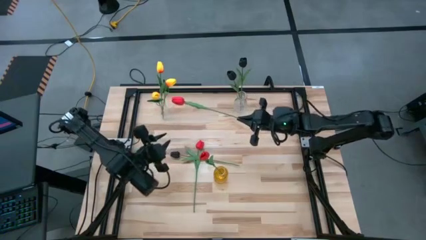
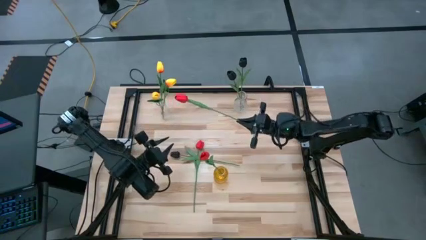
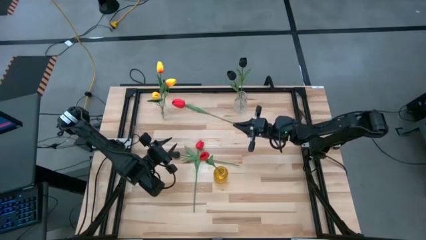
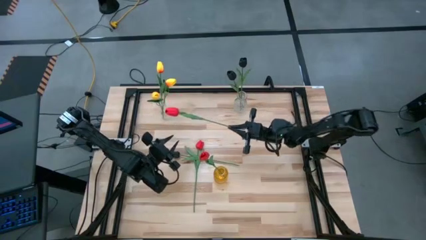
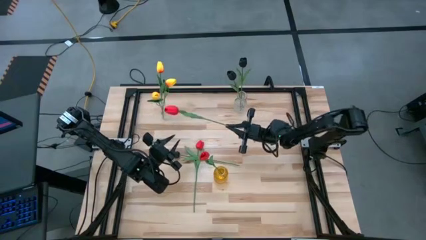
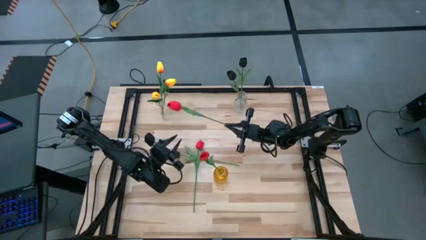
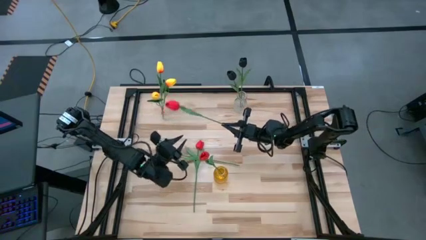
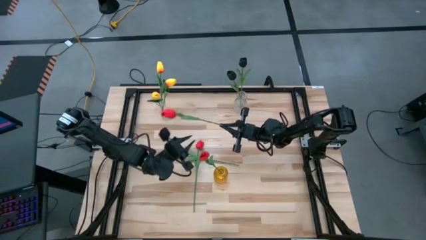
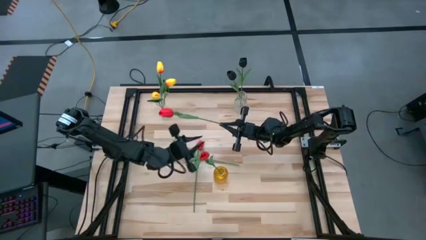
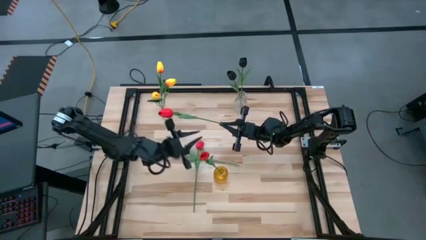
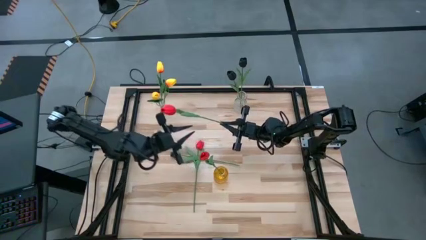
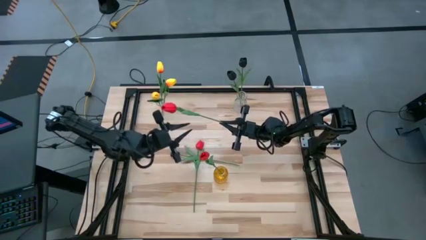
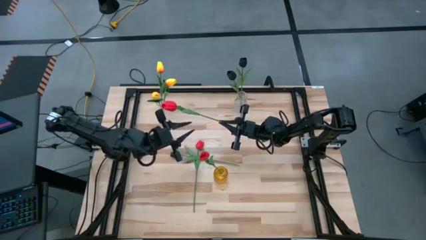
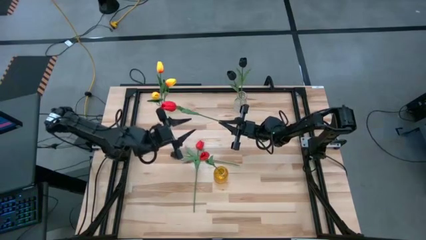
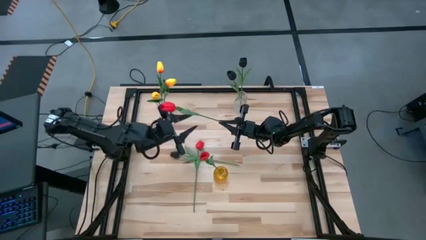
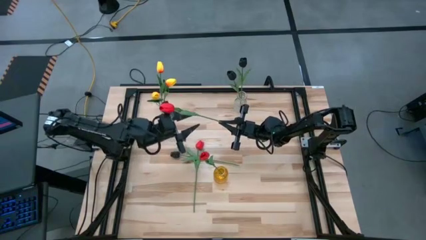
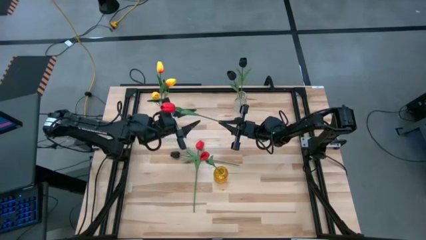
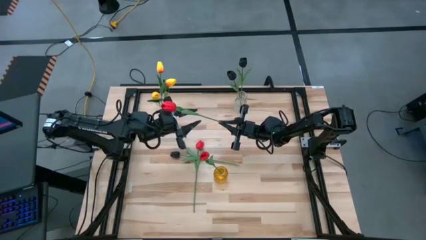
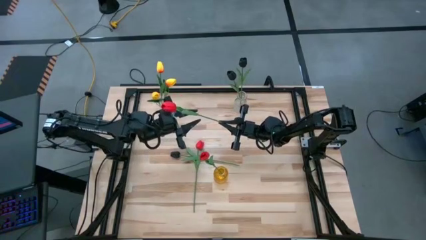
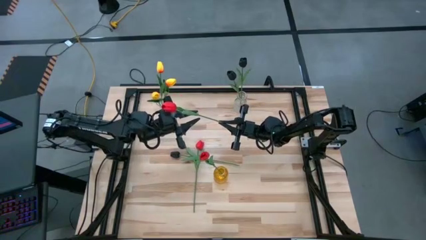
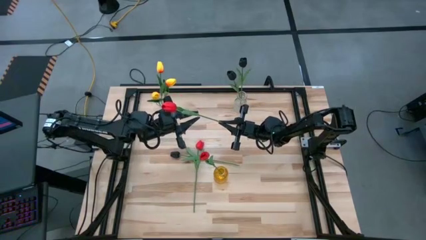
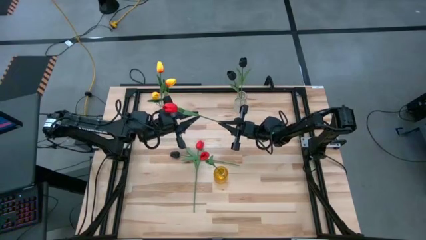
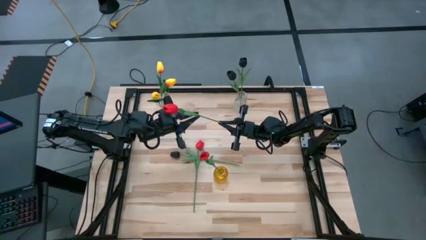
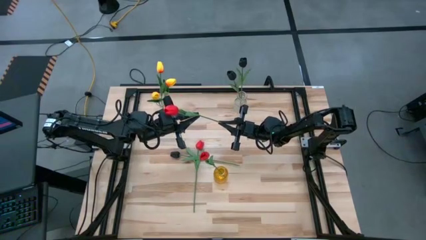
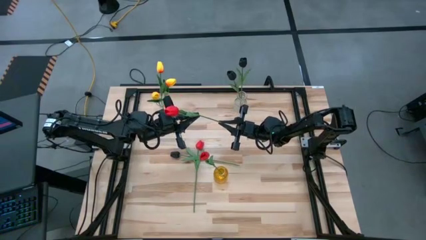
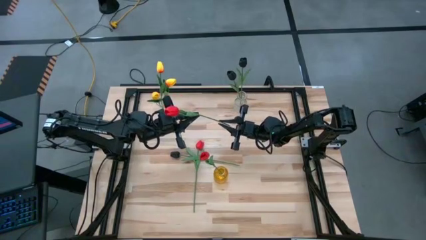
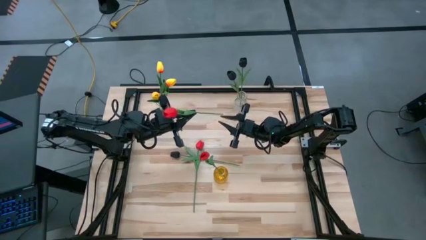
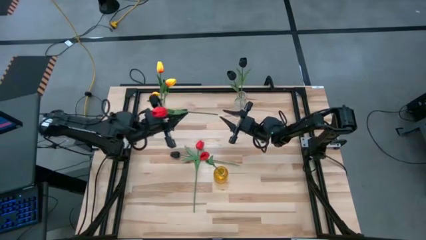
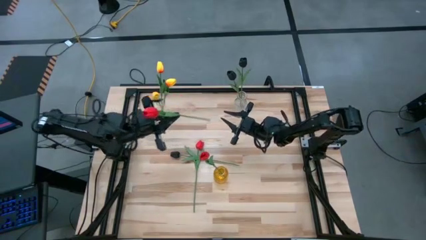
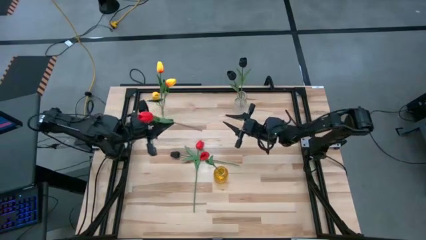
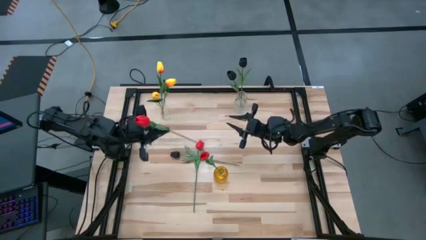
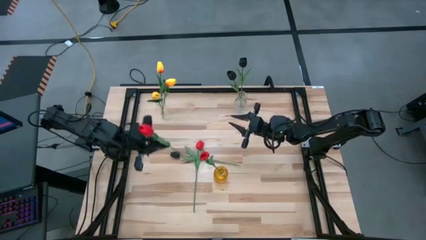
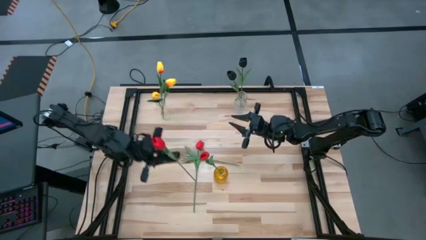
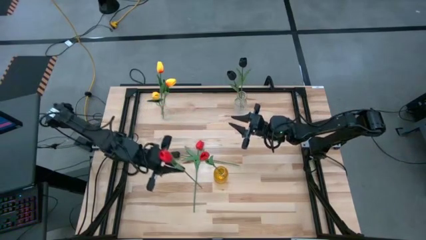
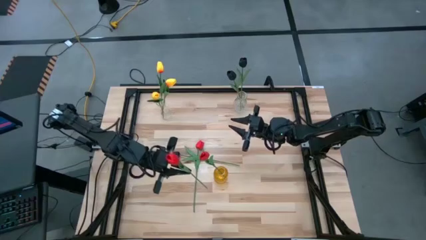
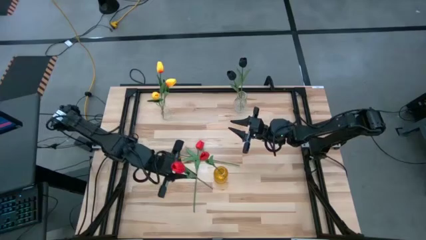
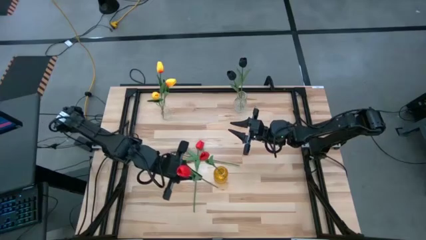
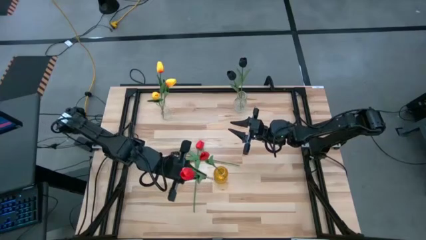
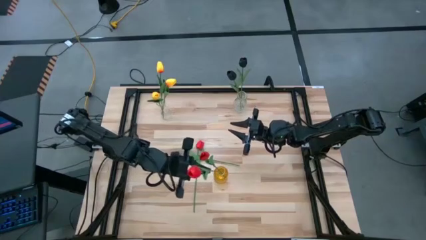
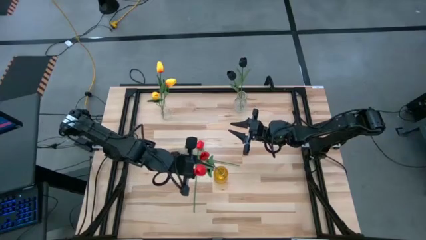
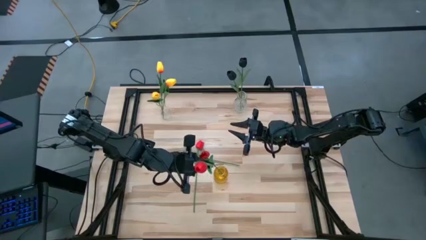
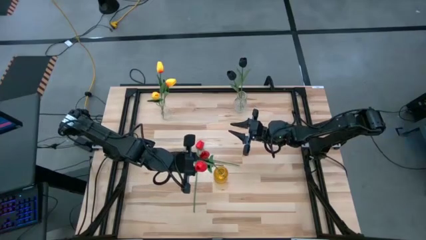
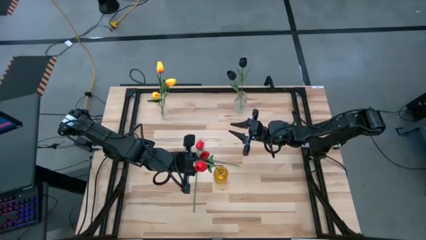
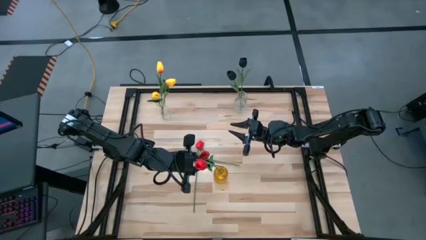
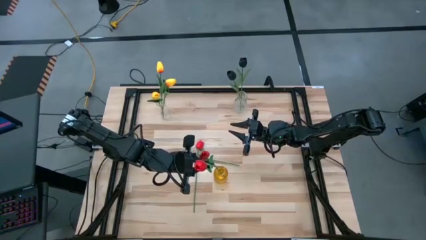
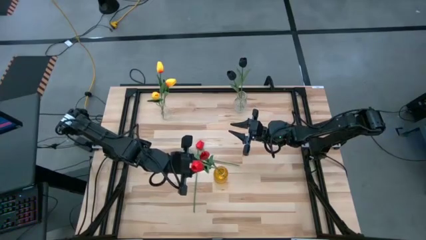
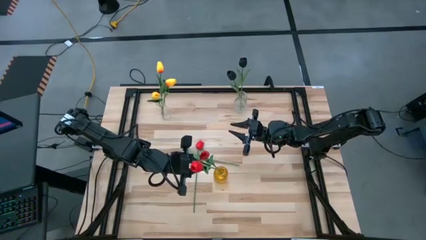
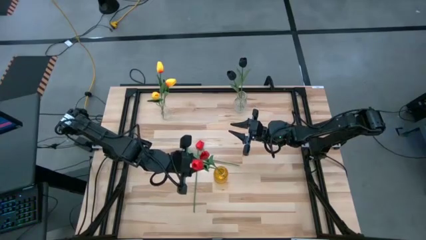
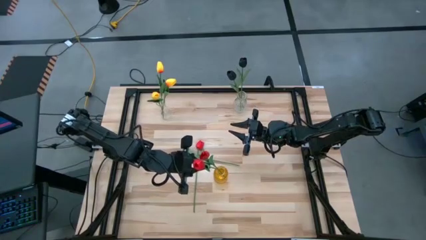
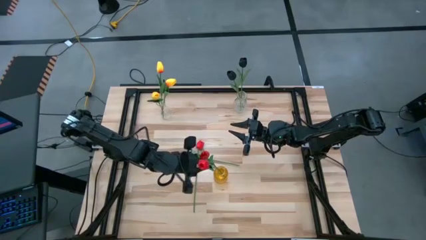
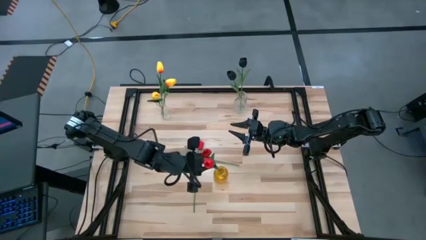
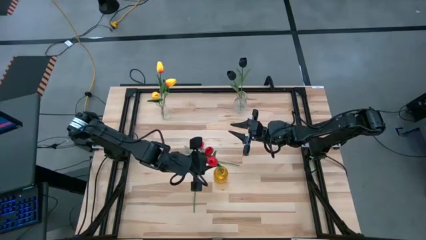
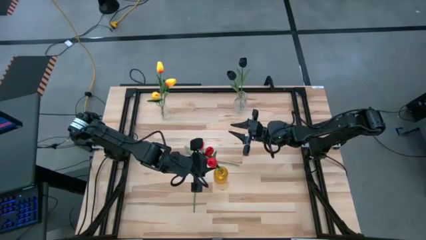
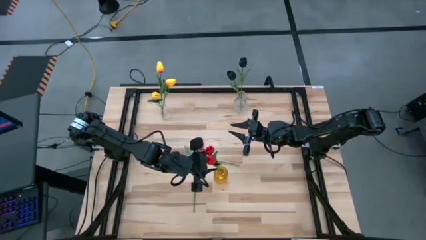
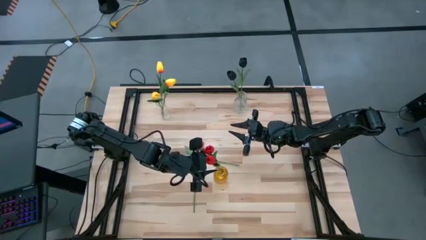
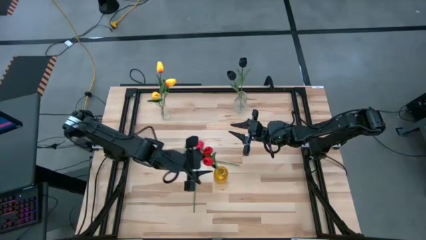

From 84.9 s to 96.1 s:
Task: Sort flowers into vase by color
Put the left red flower into the yellow vase
